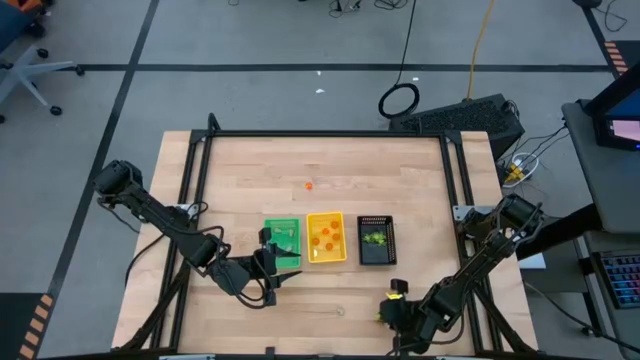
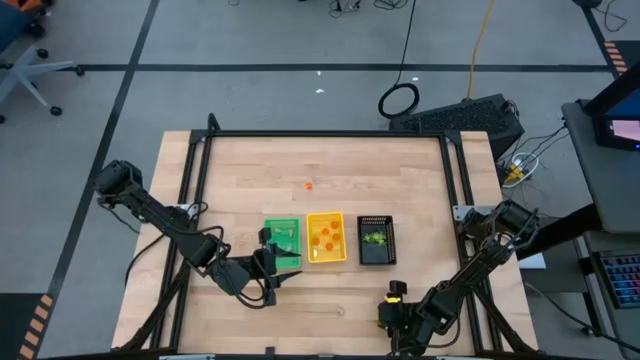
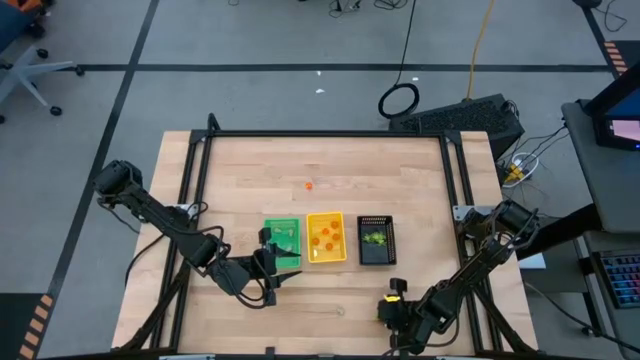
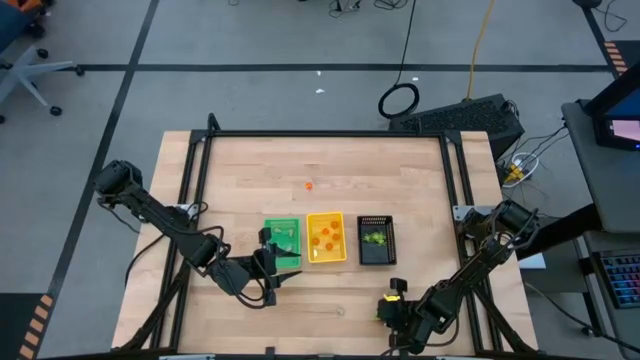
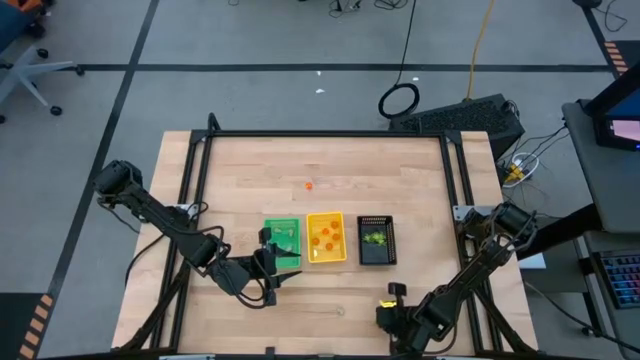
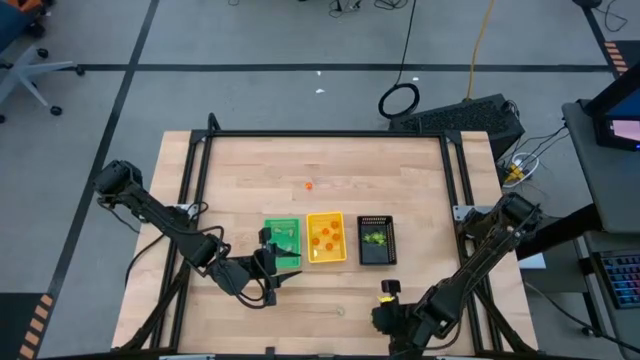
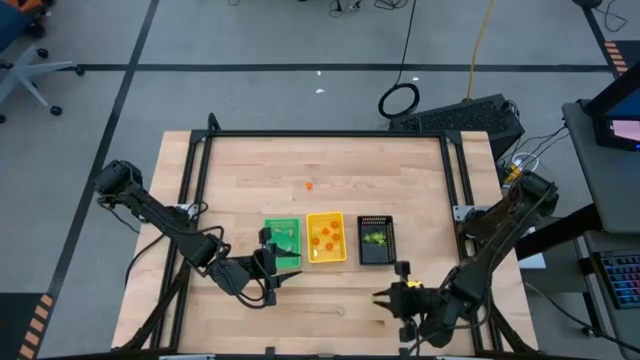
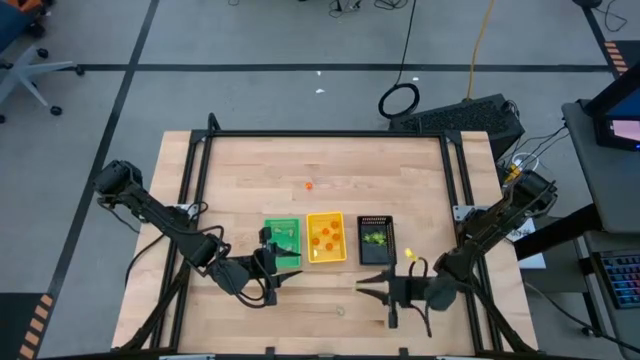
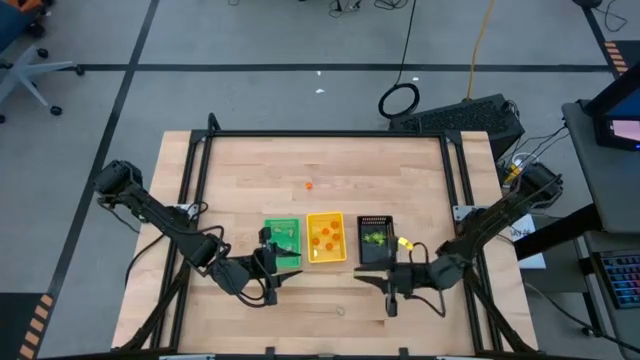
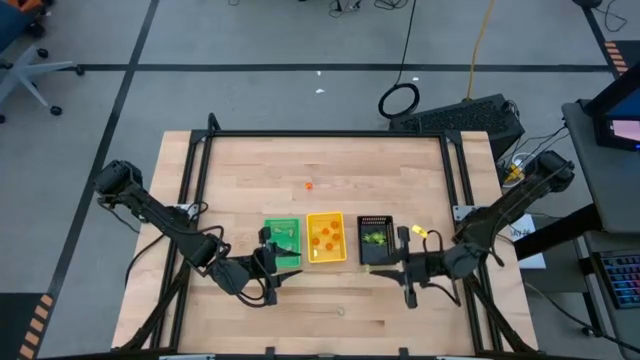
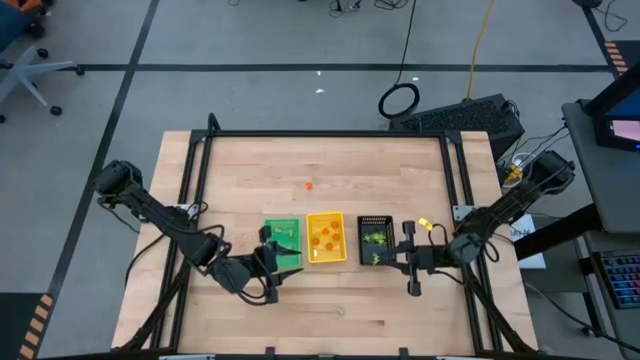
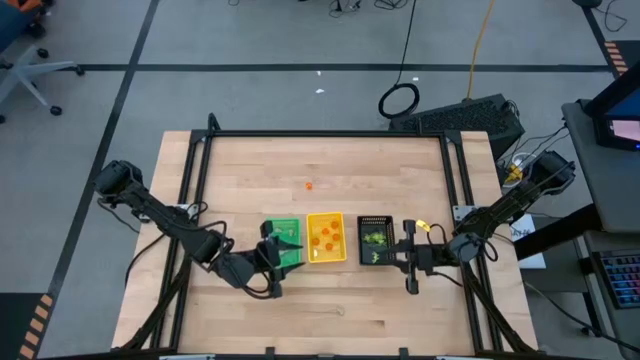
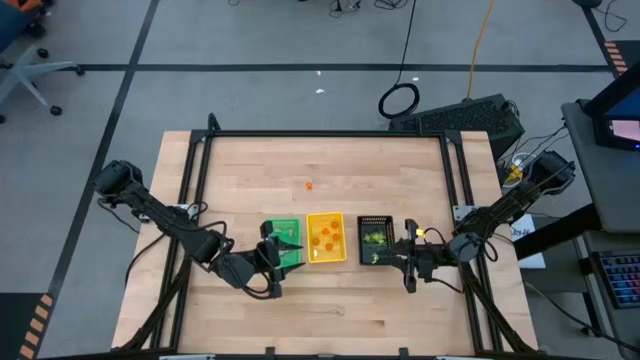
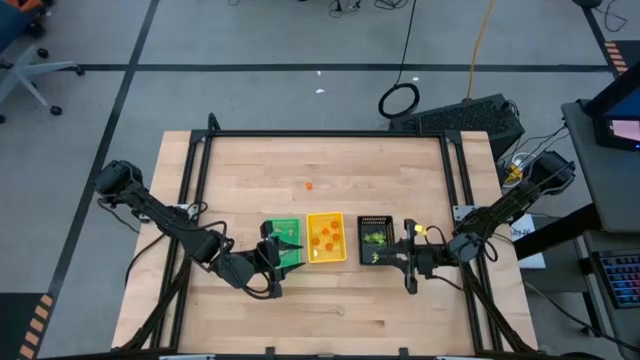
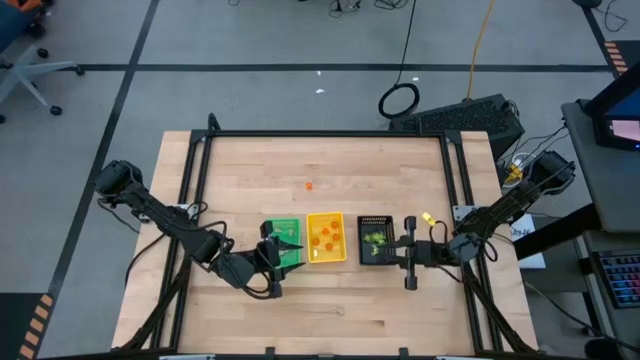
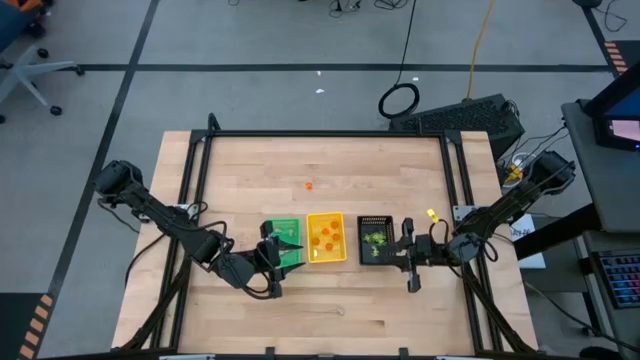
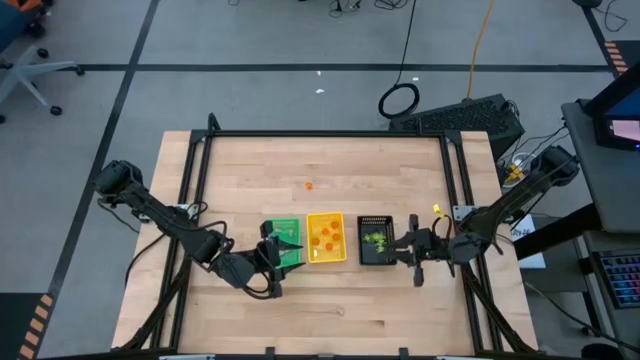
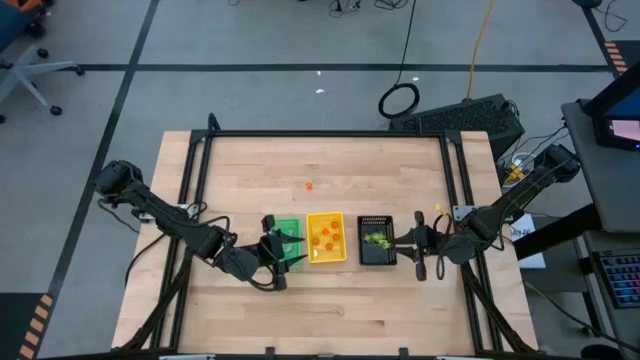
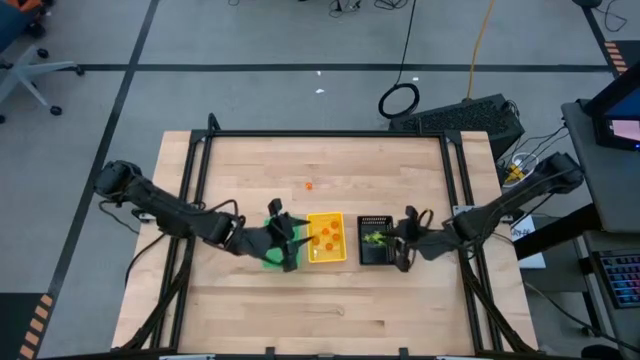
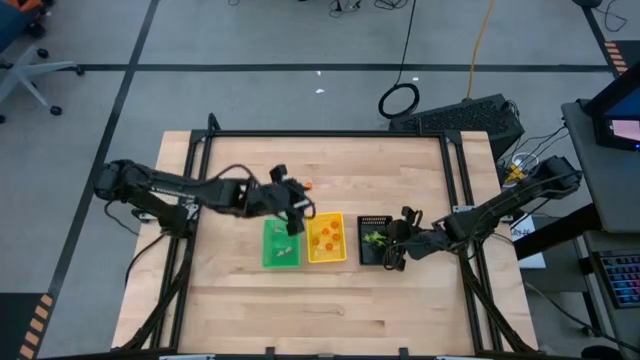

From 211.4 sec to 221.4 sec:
Task: Sort Halloween decoration
Put the green spider toy into the black basket

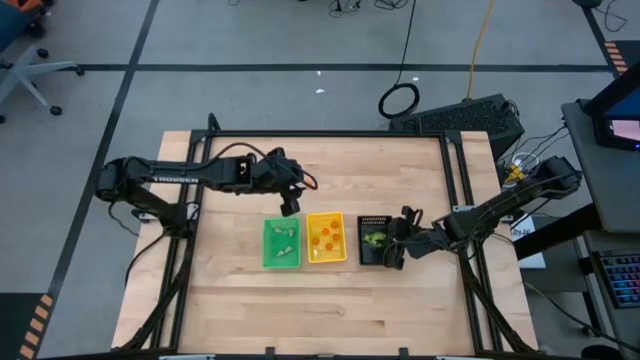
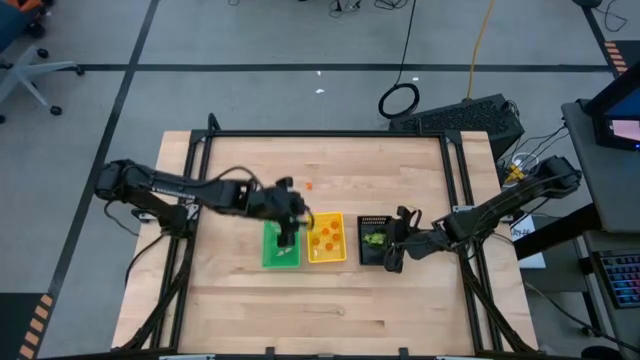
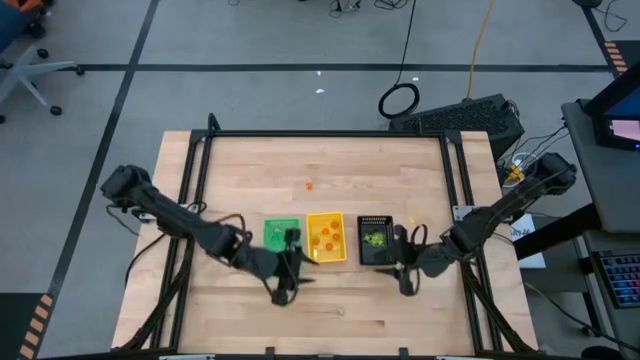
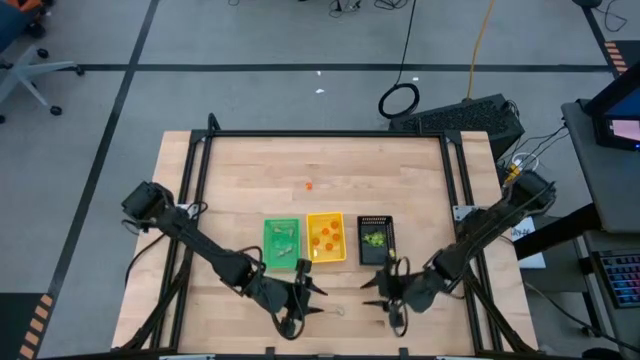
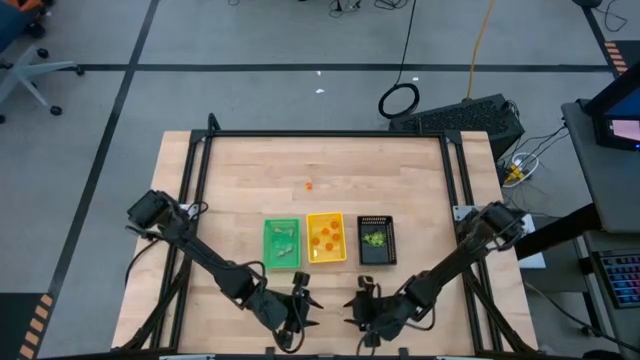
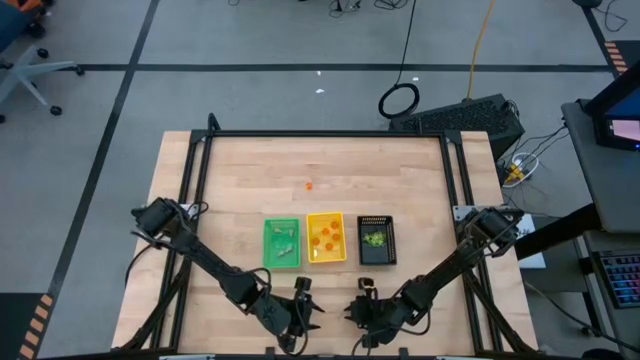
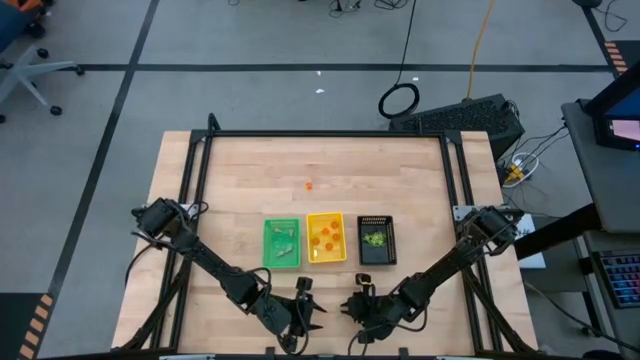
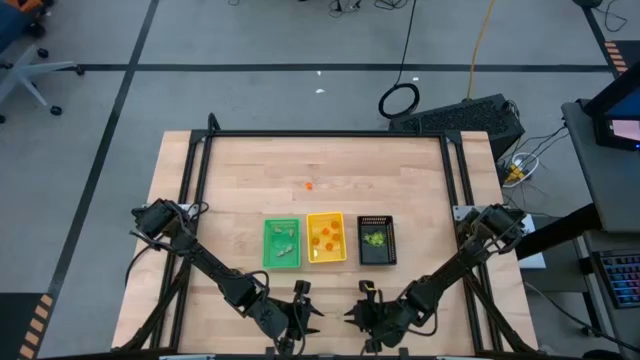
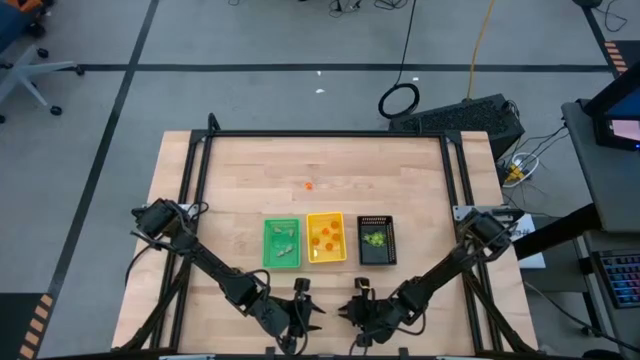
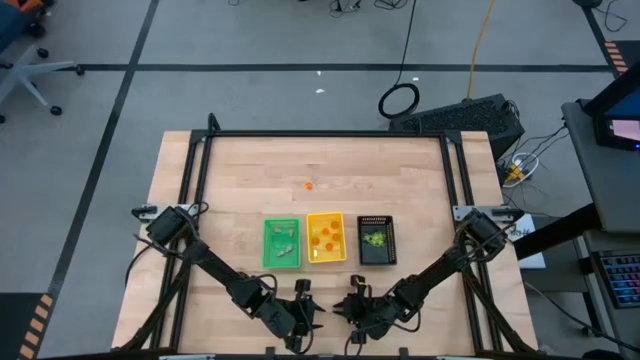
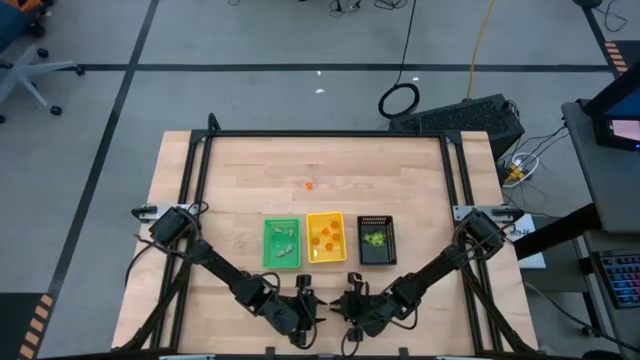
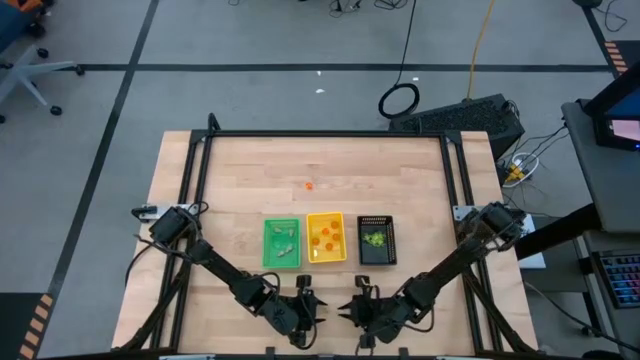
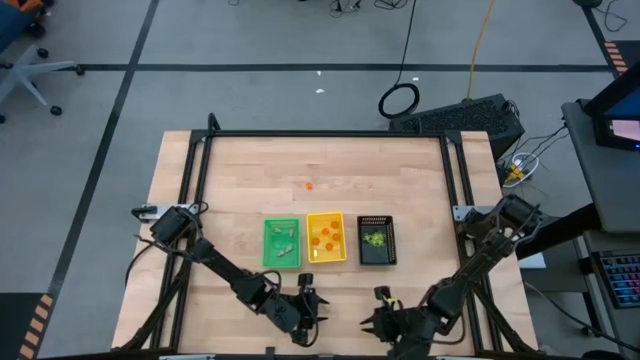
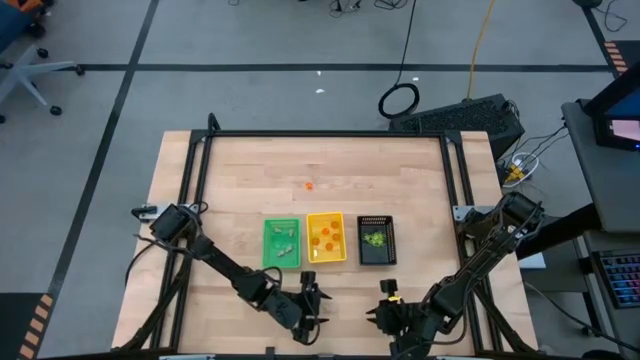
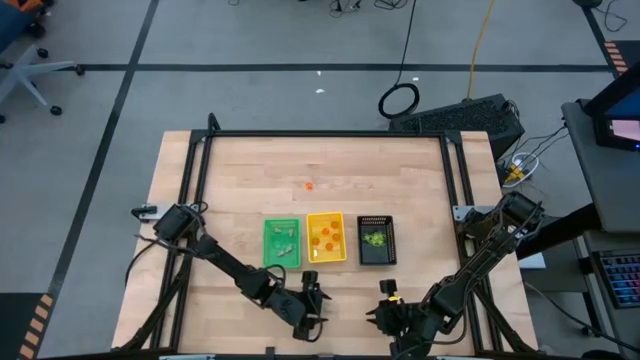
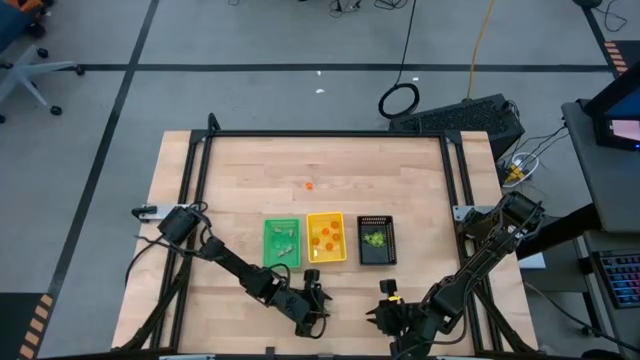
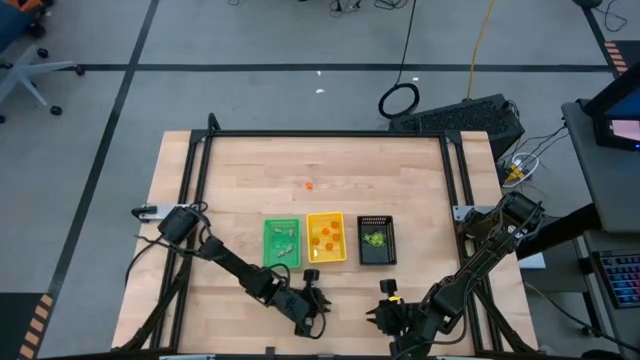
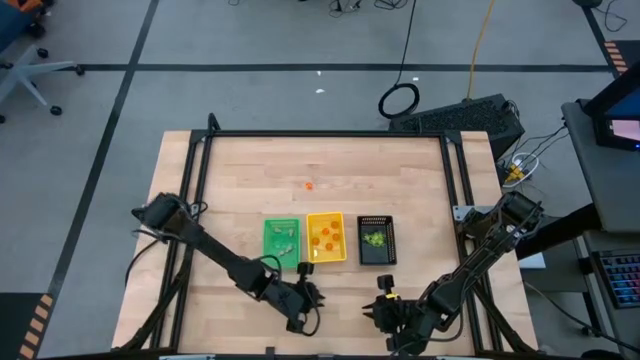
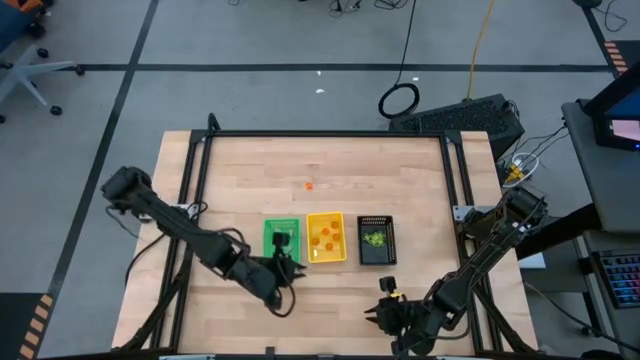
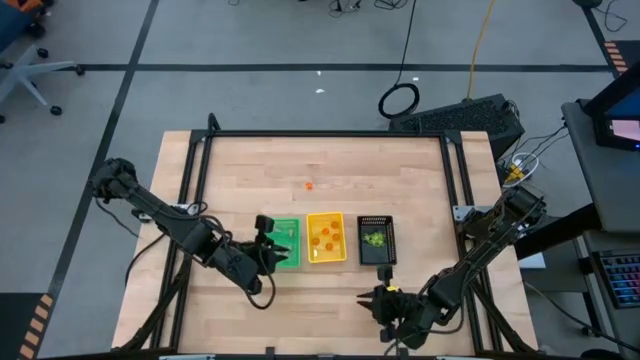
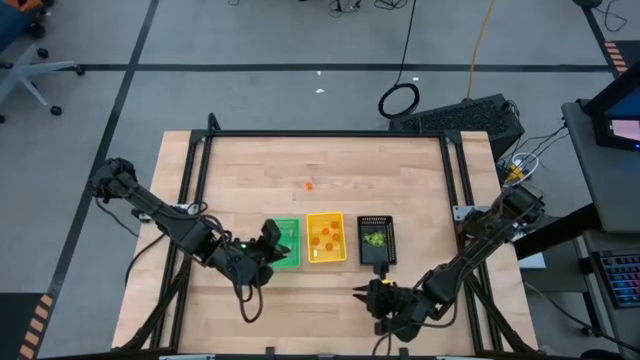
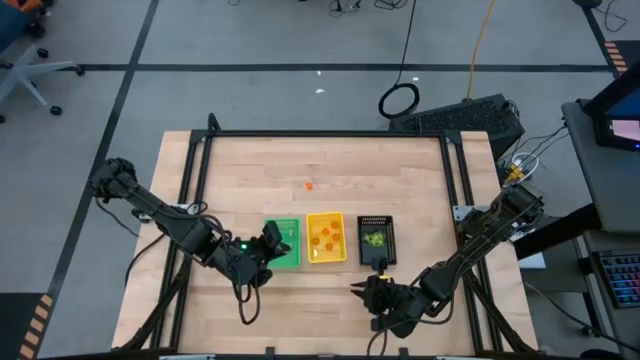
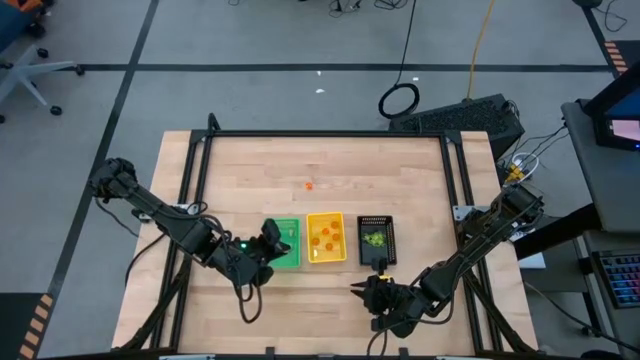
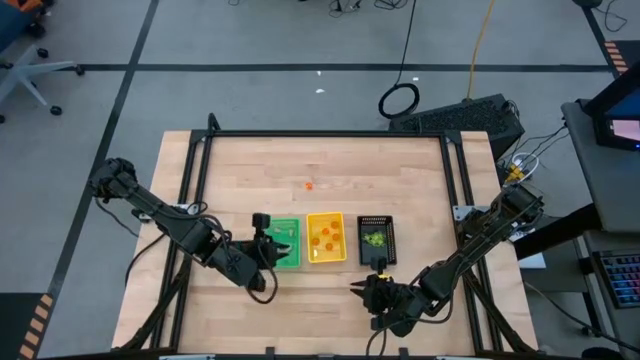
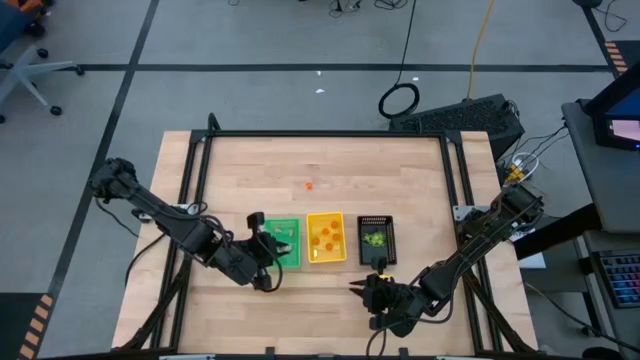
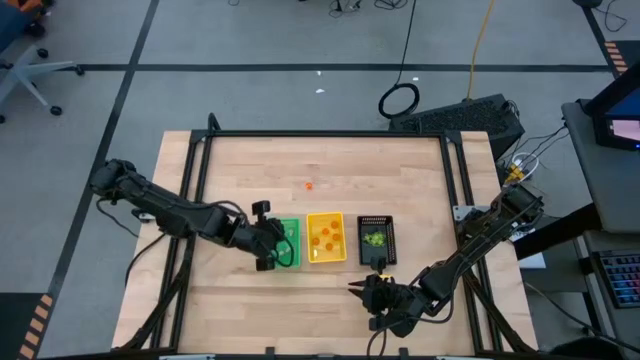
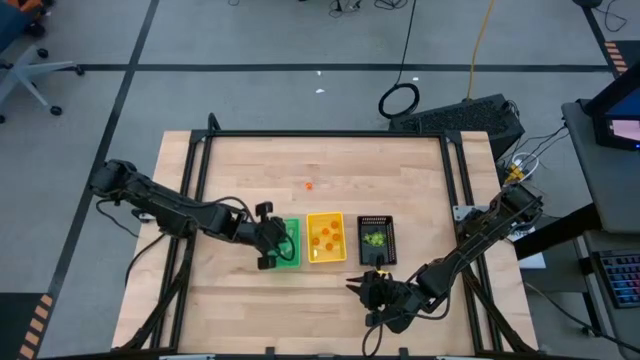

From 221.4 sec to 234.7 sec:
Put the white skull toy into the green basket
